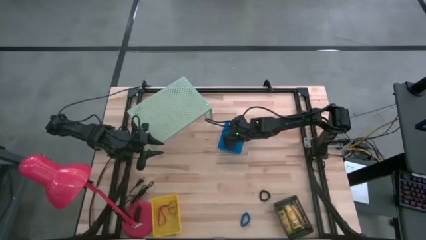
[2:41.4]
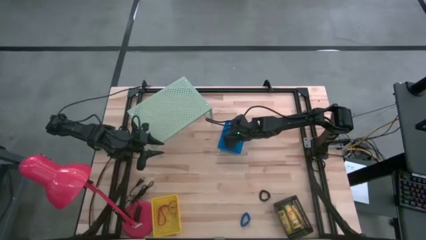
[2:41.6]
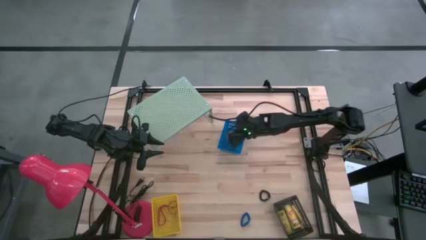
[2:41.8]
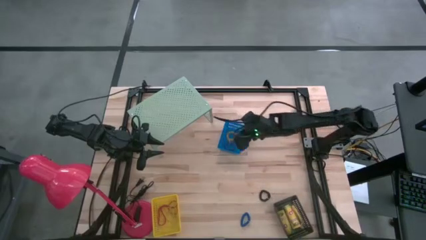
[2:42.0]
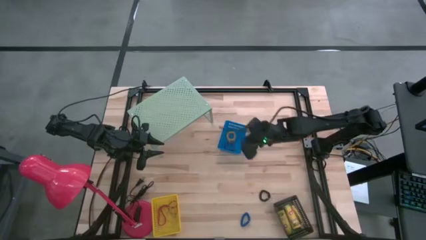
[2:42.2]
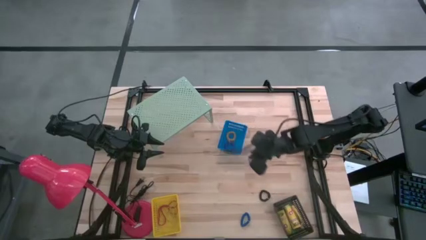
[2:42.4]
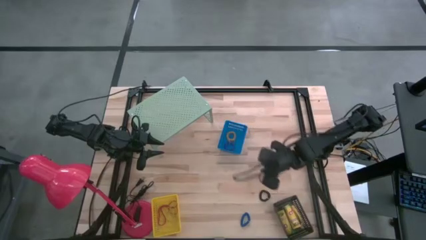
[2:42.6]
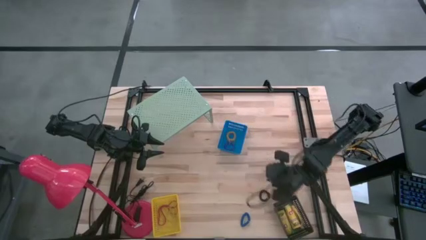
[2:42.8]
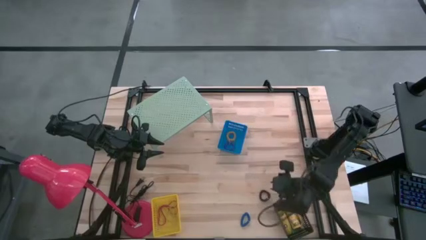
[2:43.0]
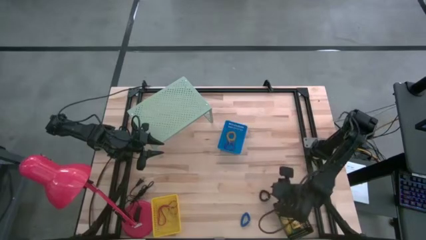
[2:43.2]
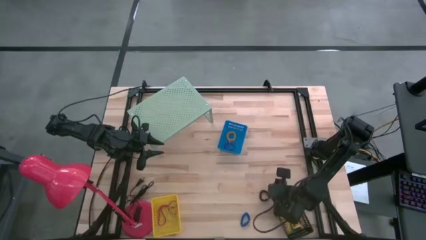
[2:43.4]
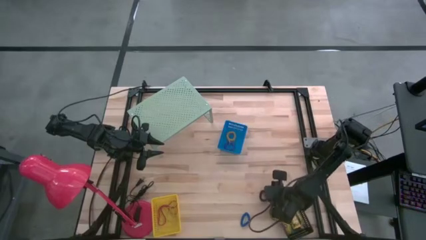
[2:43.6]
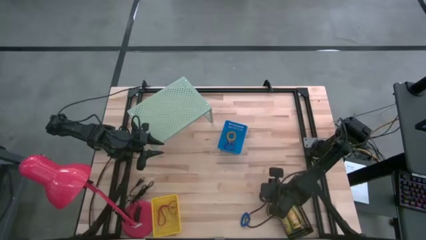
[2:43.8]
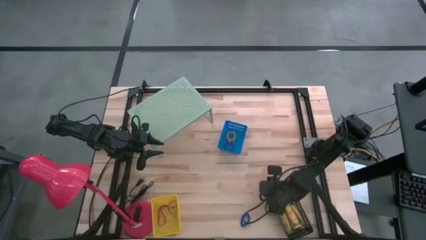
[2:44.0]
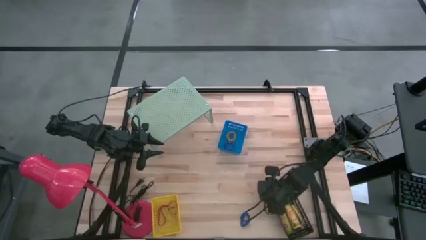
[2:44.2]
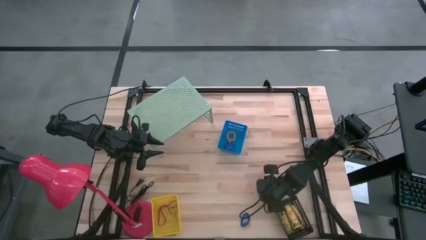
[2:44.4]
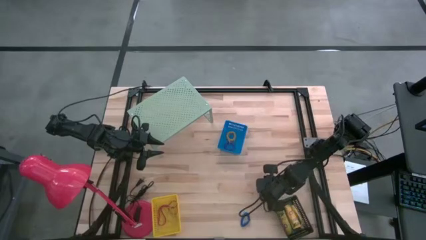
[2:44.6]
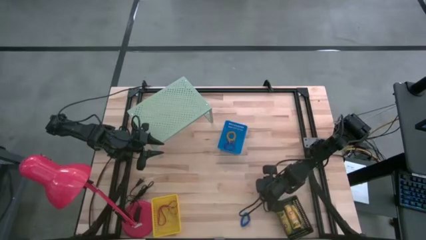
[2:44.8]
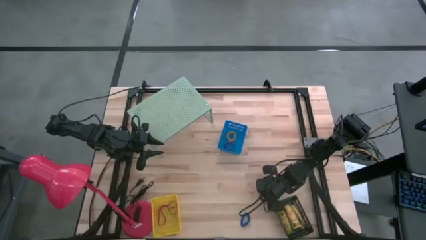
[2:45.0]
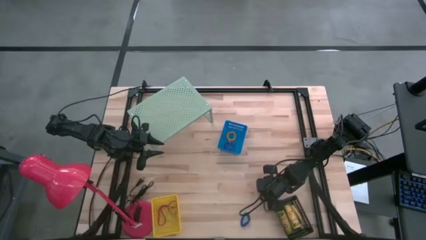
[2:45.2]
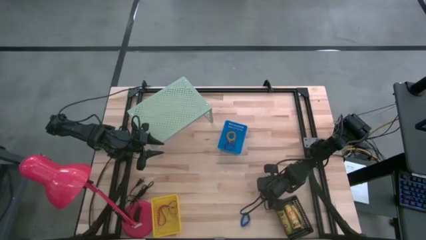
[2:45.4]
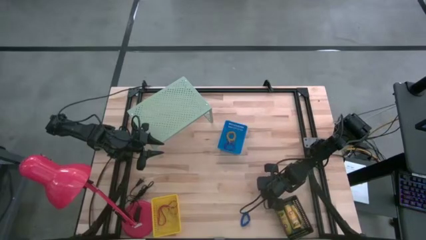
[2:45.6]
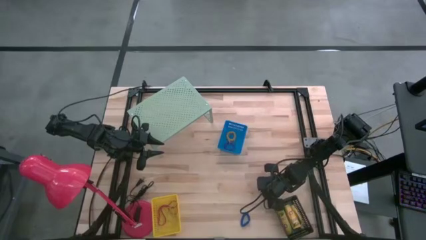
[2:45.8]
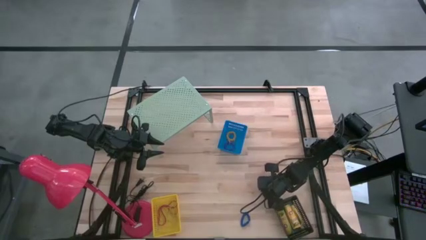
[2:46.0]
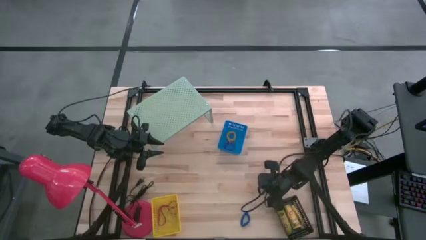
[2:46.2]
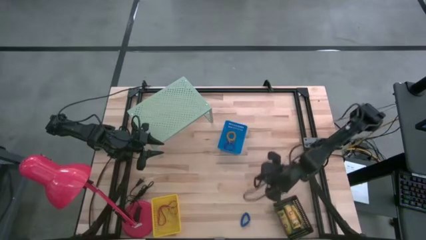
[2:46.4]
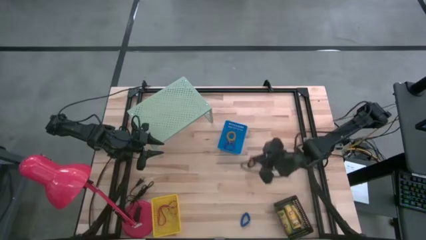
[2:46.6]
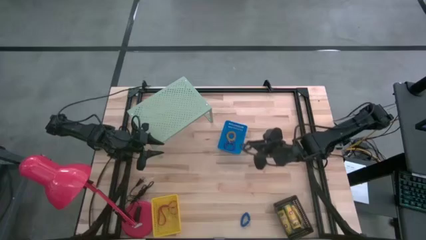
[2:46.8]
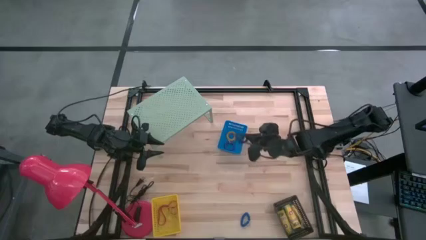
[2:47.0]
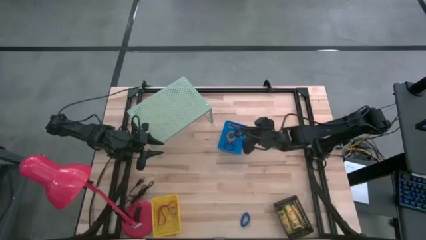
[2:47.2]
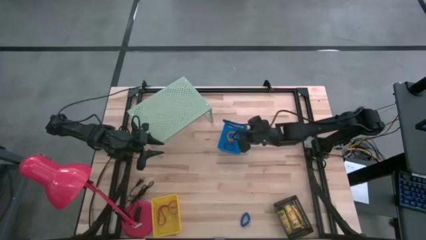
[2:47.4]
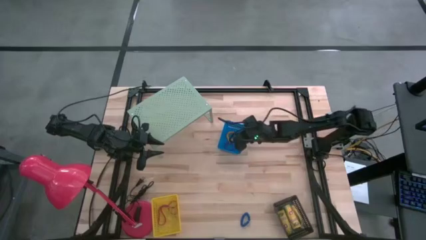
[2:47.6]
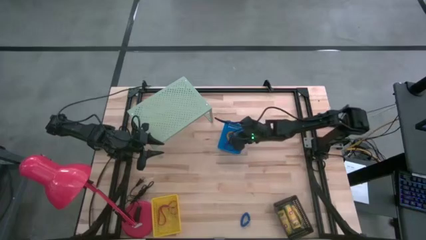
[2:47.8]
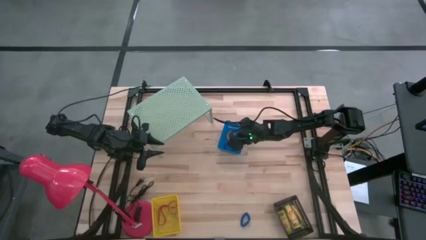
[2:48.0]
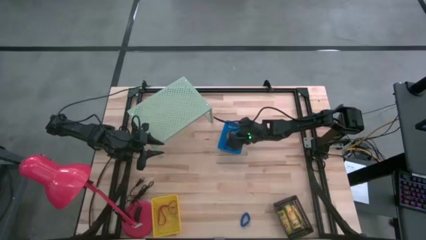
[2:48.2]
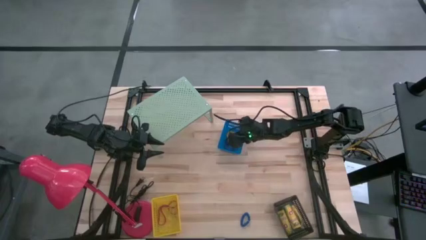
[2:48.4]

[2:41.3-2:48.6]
Task: Pick & Place Office Desk Supplies
Put the black spring keychain into the blue basket

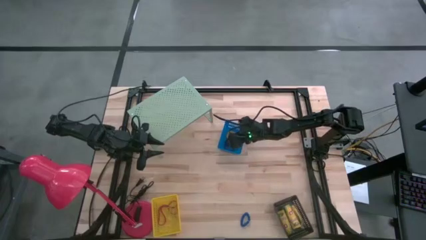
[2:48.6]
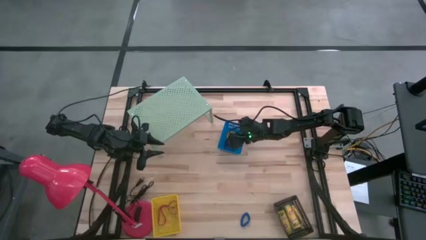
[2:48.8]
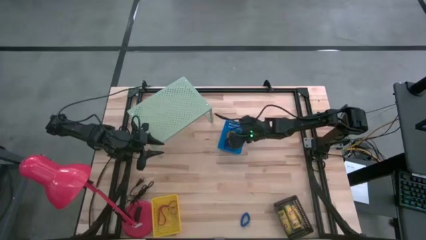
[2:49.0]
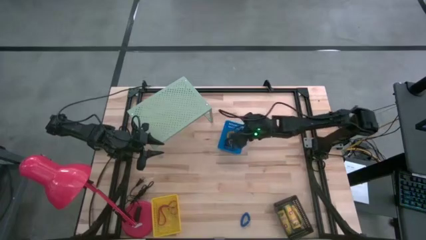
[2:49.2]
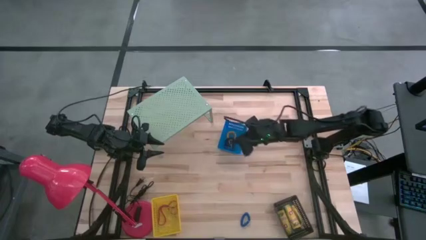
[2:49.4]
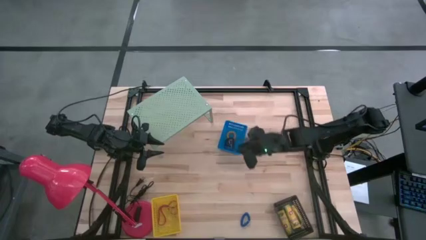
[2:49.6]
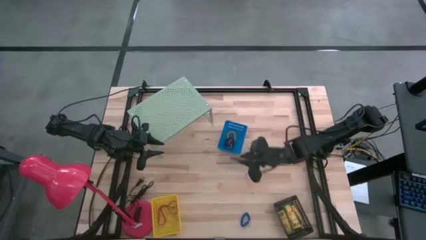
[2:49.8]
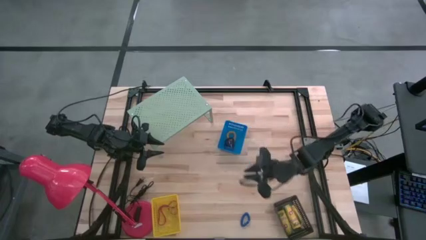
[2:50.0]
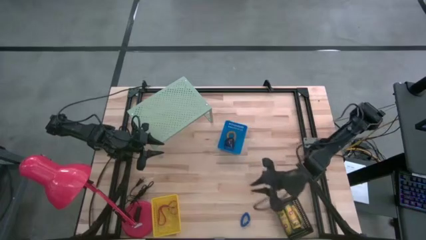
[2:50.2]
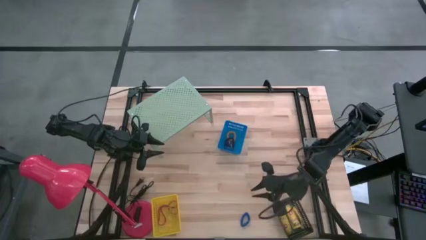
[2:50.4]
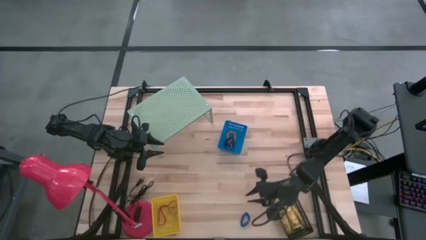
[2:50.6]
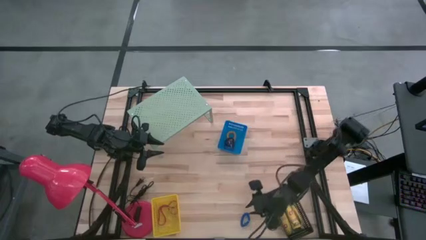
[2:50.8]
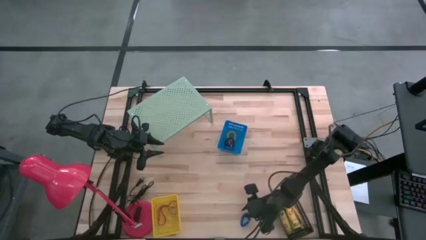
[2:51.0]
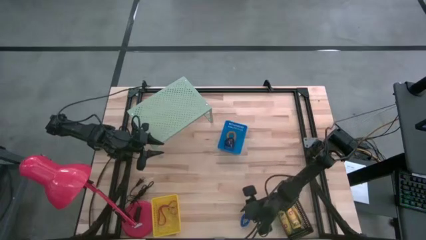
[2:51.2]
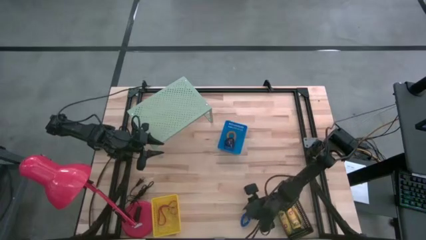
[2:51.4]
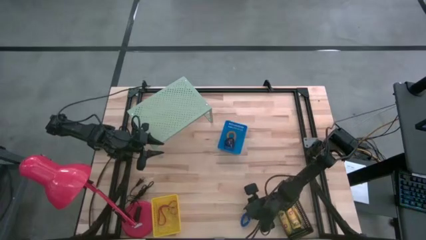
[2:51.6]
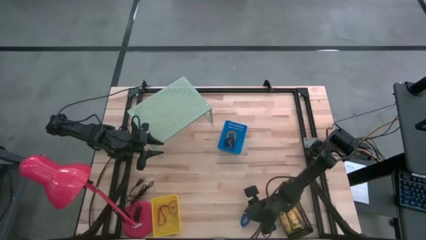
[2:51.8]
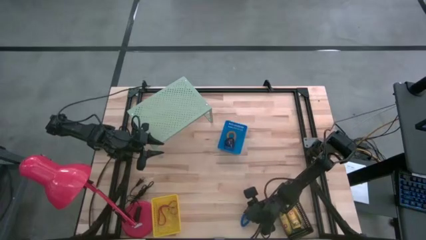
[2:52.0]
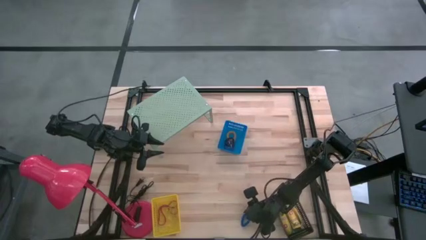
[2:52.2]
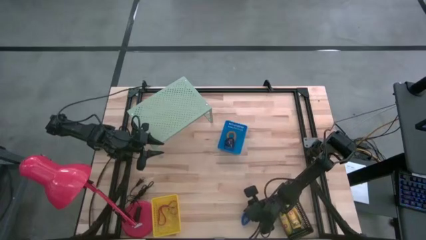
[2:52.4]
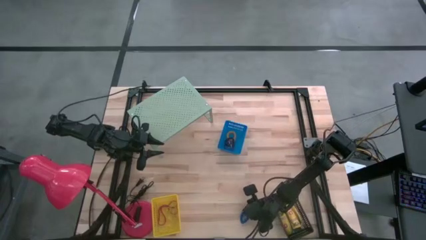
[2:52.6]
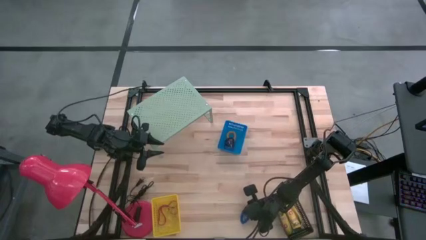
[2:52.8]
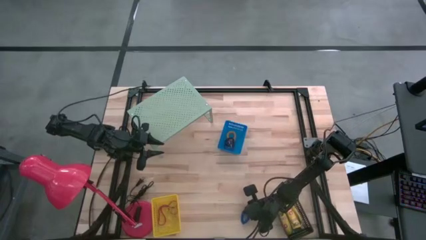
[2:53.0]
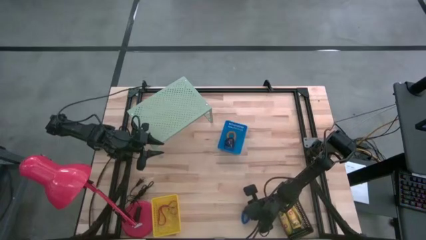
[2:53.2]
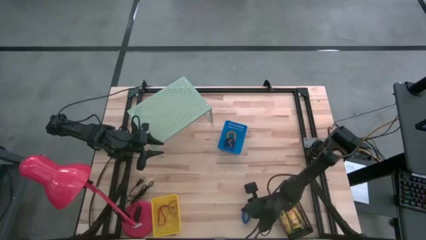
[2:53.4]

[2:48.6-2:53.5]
Put the blue spring keychain into the blue basket

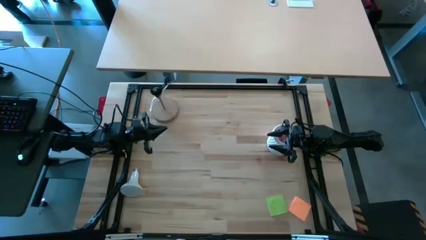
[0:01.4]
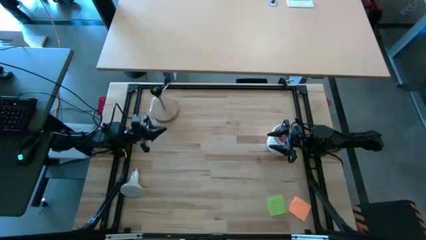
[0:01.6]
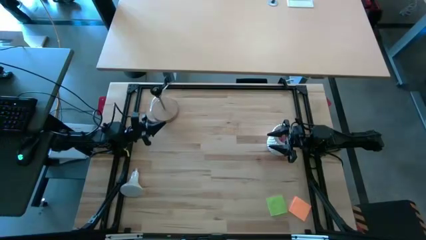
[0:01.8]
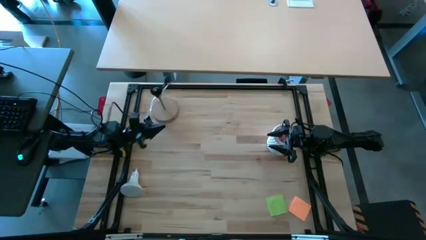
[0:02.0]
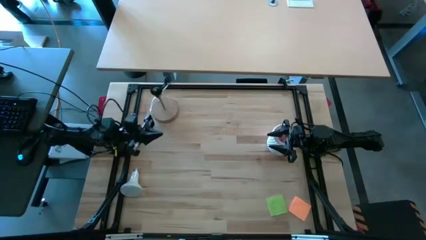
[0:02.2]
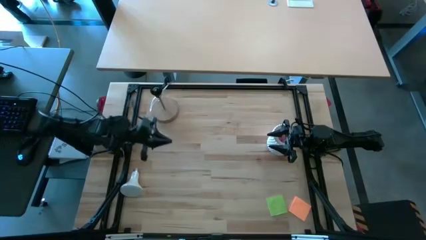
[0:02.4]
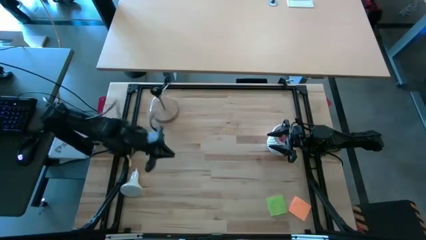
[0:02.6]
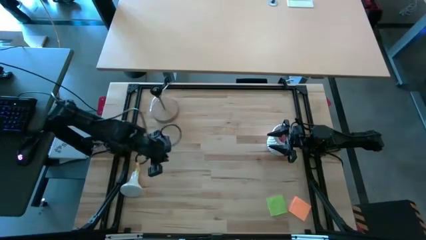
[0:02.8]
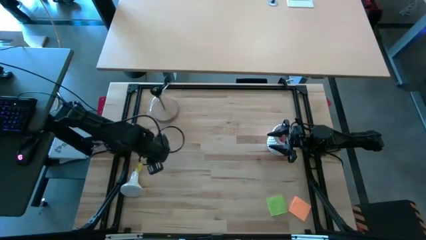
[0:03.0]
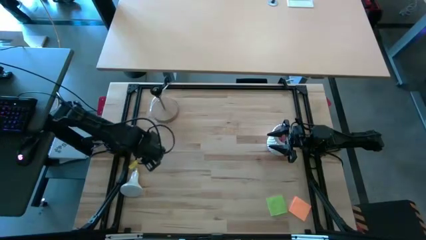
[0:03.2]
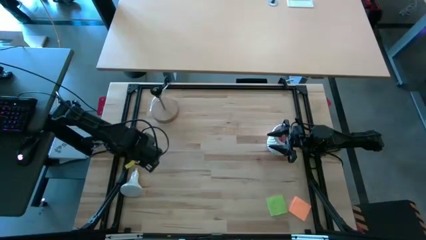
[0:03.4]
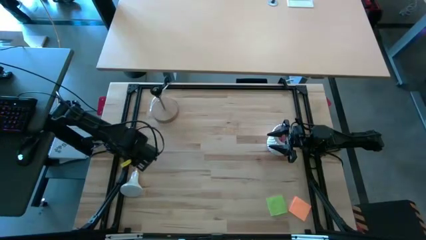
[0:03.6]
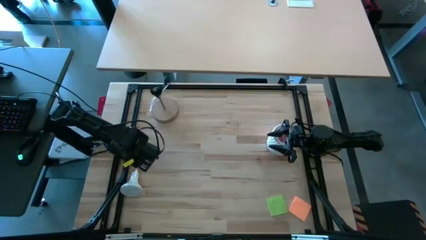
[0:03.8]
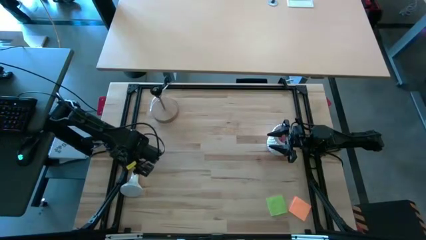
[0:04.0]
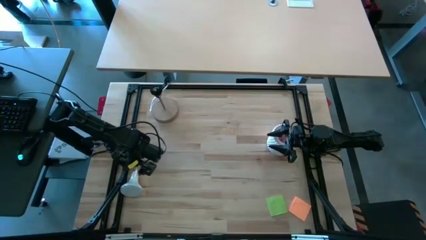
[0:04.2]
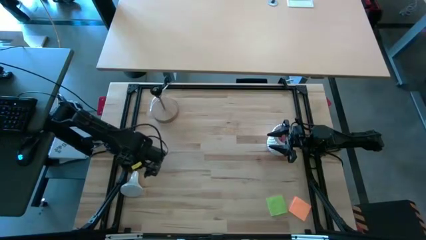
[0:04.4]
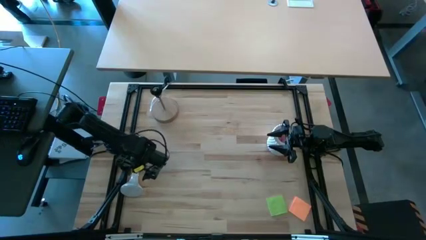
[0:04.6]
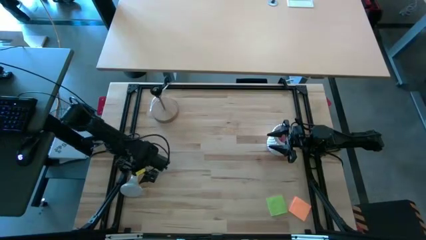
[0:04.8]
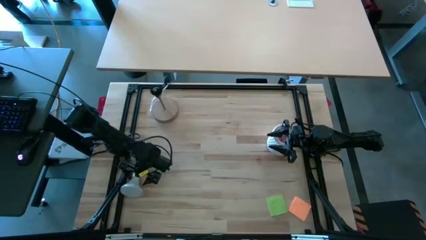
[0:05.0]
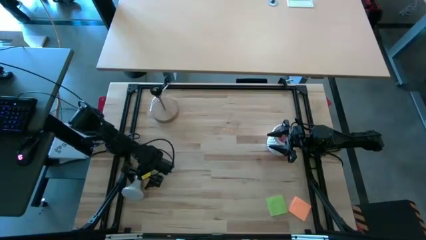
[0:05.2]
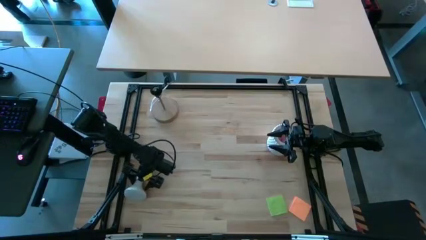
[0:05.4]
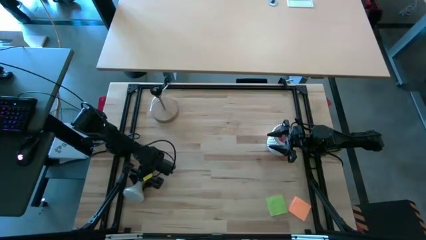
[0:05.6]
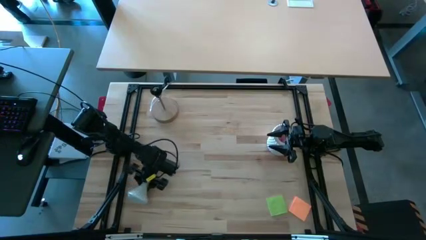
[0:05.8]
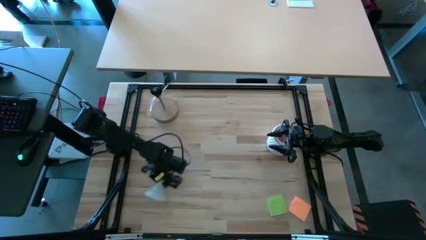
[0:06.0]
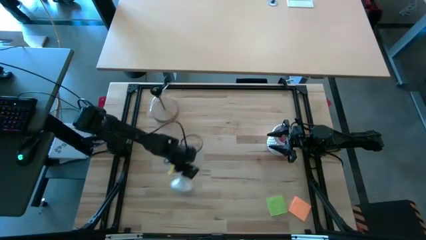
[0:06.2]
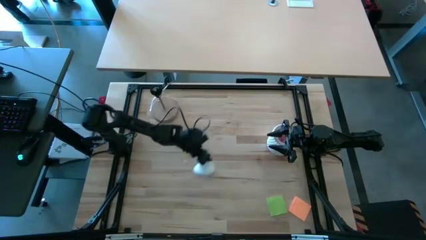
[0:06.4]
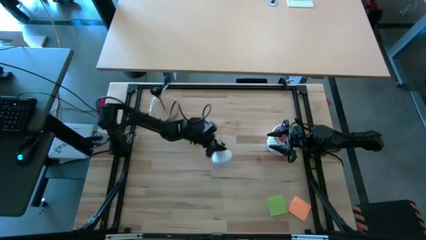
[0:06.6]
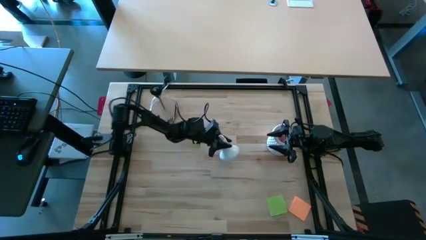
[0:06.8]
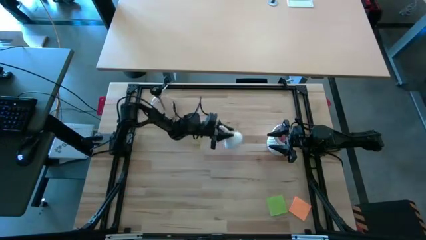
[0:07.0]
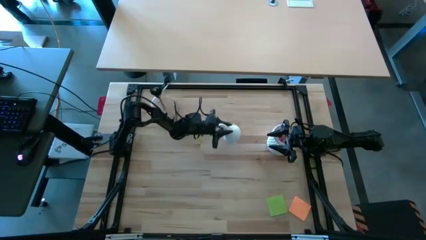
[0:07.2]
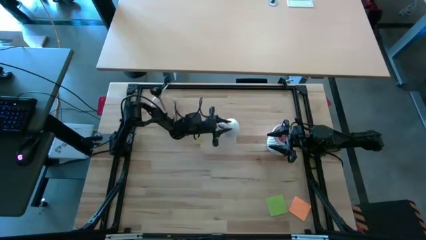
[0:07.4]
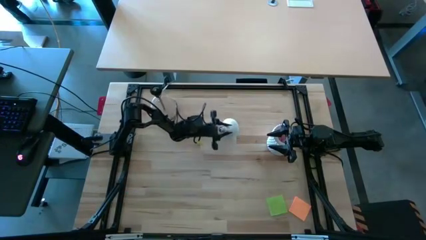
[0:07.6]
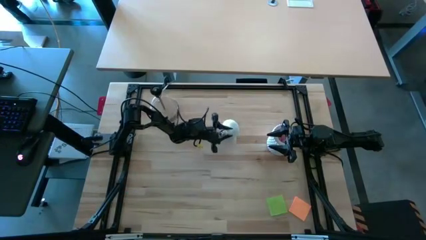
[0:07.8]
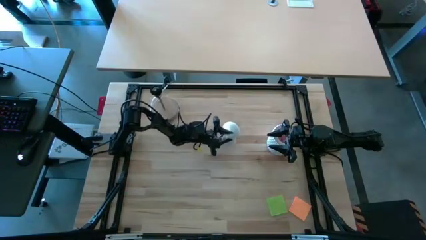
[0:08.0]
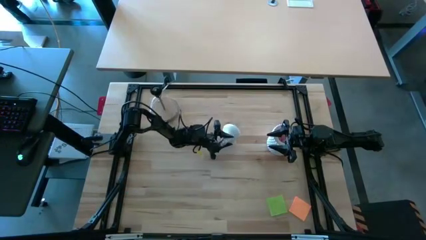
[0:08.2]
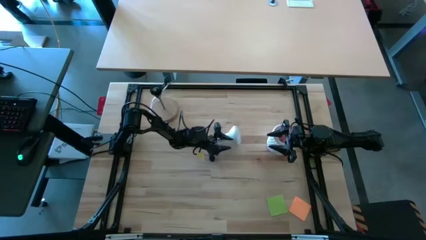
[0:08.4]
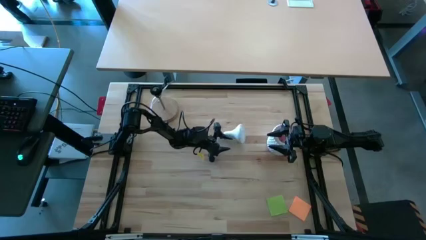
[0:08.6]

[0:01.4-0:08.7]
Task: Screw lightbulb
Move the lightbulb to the center of the table
